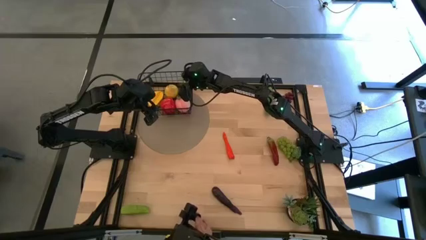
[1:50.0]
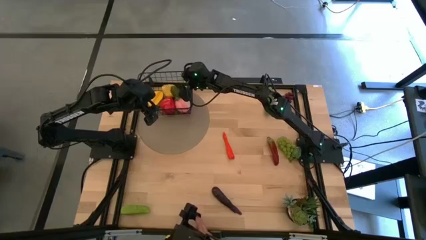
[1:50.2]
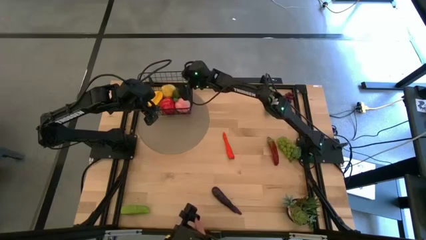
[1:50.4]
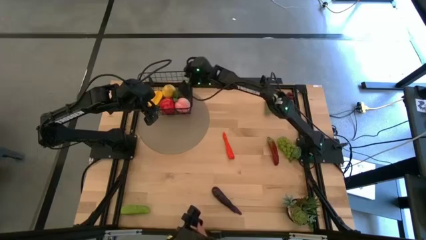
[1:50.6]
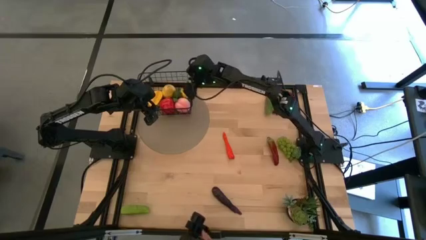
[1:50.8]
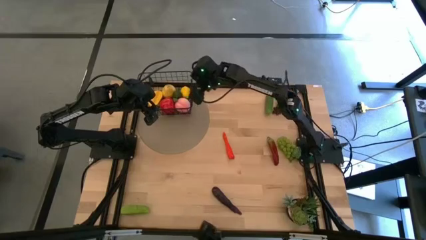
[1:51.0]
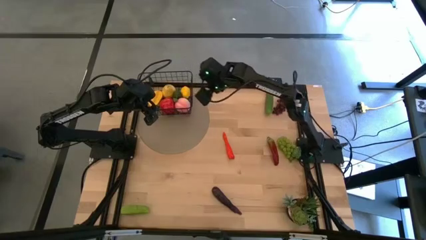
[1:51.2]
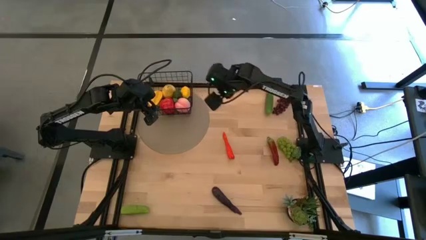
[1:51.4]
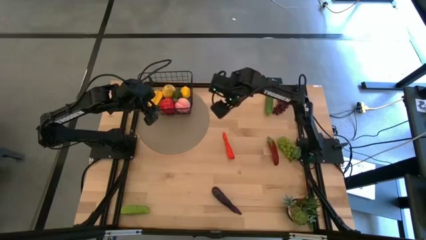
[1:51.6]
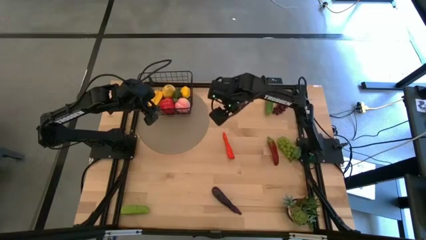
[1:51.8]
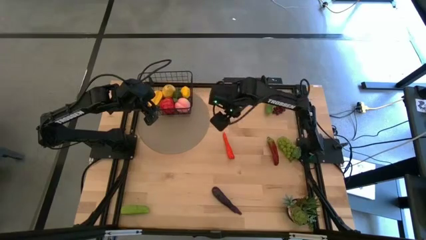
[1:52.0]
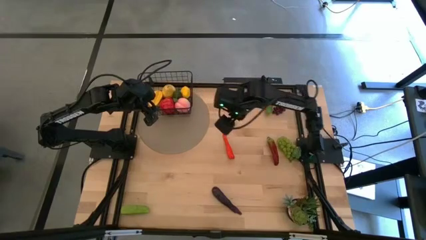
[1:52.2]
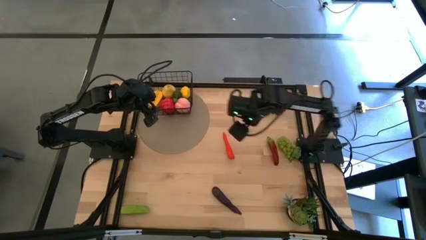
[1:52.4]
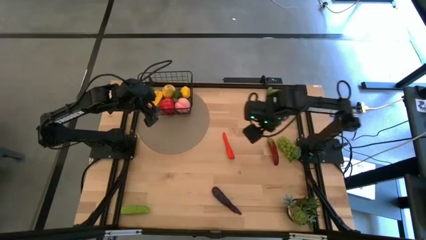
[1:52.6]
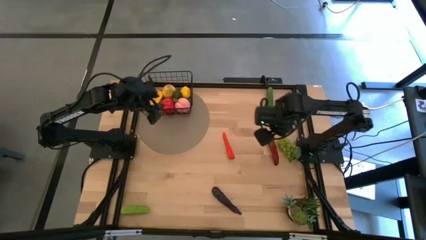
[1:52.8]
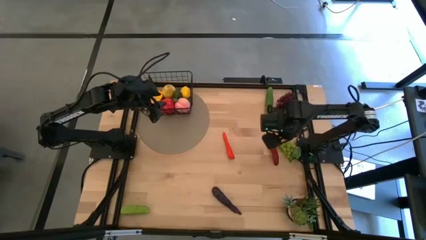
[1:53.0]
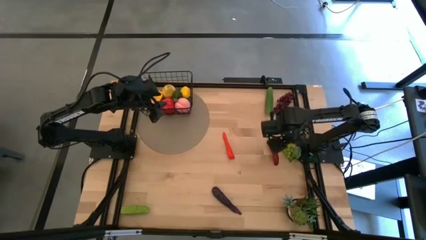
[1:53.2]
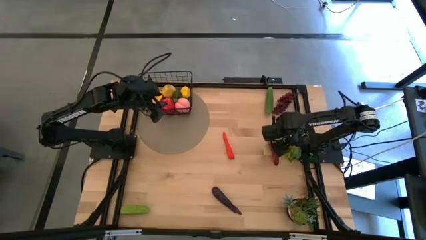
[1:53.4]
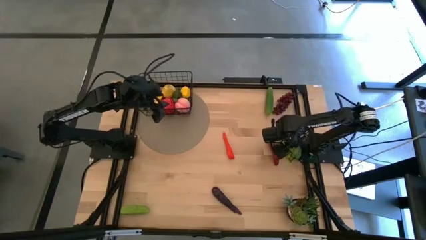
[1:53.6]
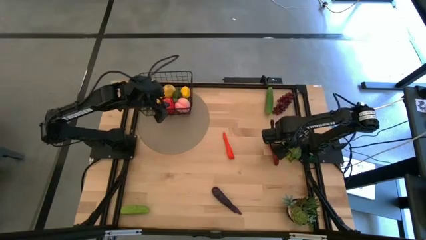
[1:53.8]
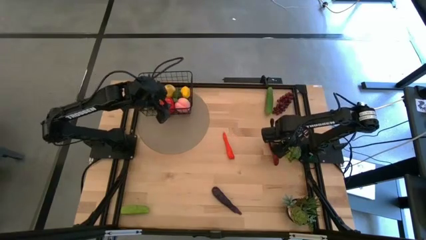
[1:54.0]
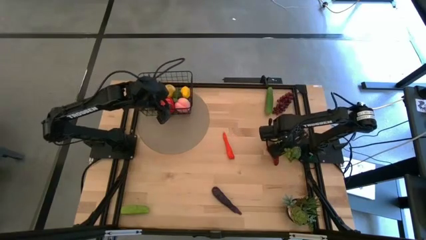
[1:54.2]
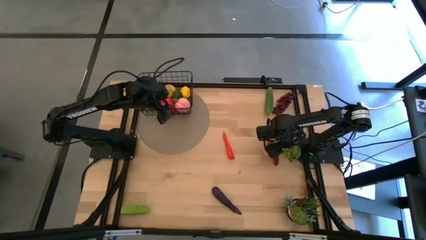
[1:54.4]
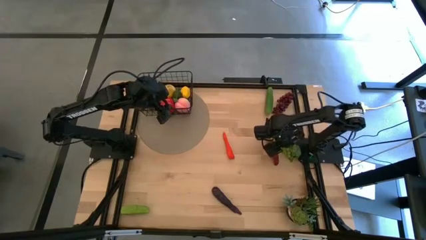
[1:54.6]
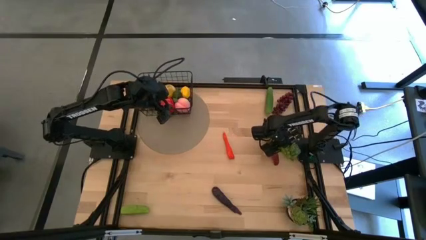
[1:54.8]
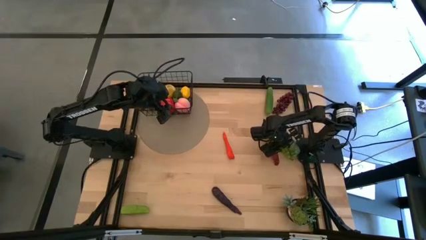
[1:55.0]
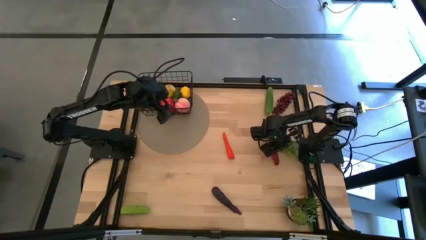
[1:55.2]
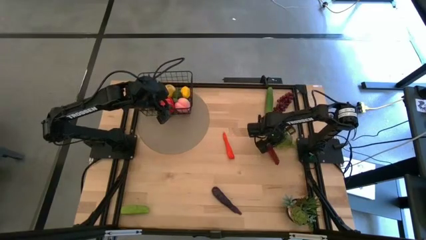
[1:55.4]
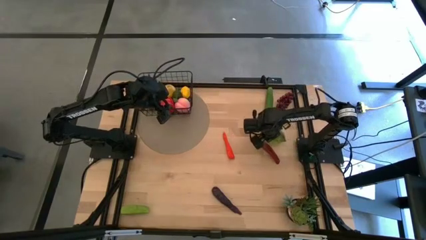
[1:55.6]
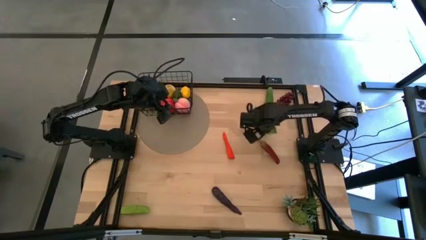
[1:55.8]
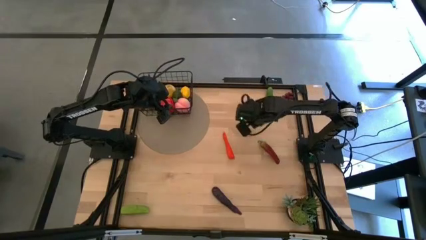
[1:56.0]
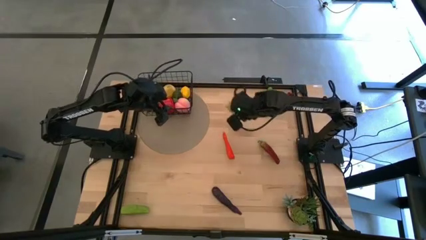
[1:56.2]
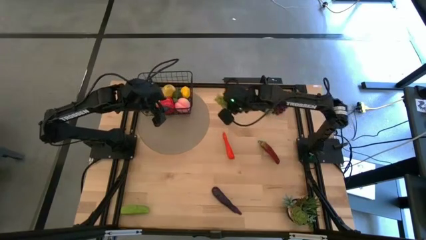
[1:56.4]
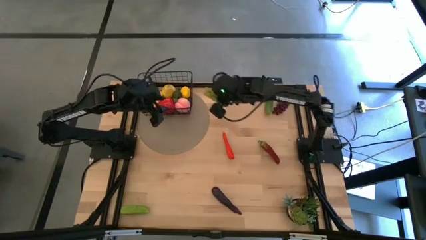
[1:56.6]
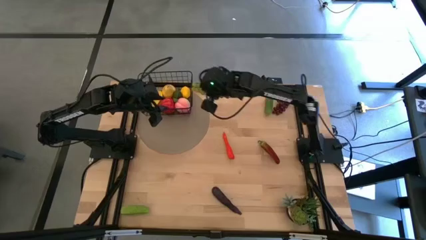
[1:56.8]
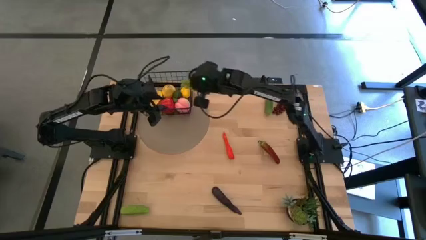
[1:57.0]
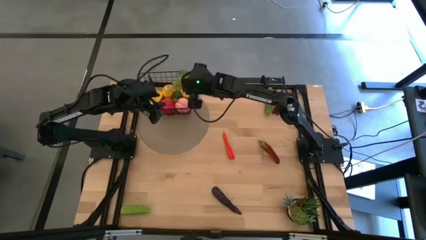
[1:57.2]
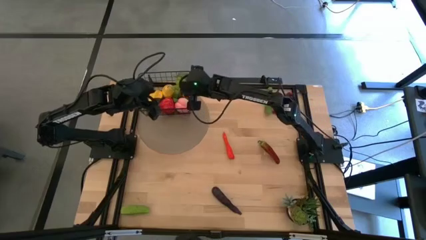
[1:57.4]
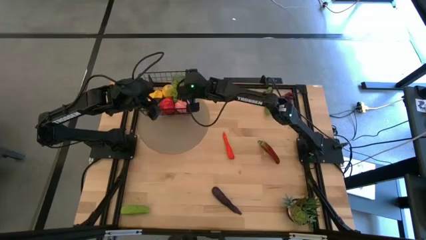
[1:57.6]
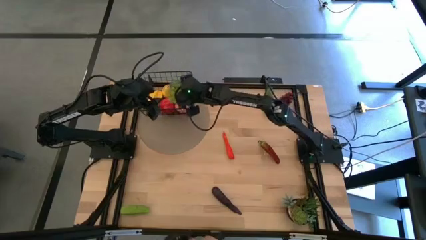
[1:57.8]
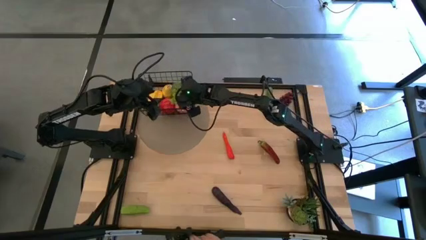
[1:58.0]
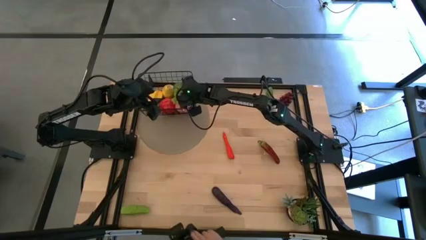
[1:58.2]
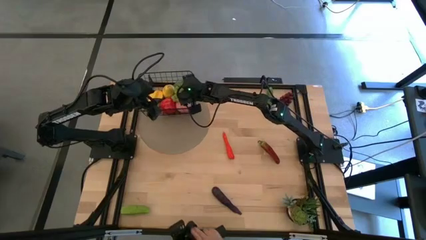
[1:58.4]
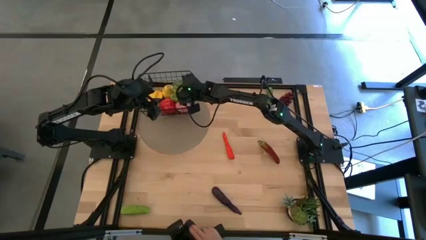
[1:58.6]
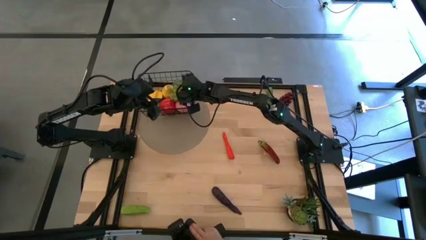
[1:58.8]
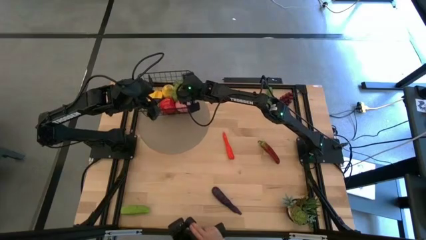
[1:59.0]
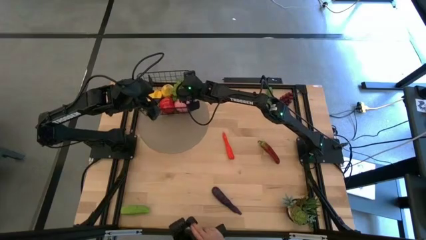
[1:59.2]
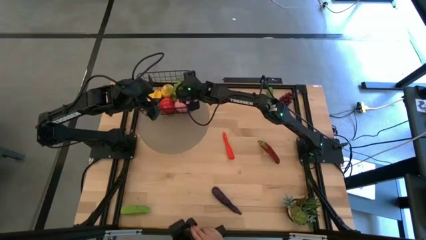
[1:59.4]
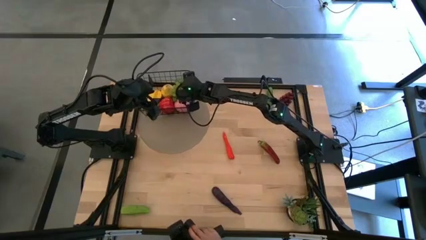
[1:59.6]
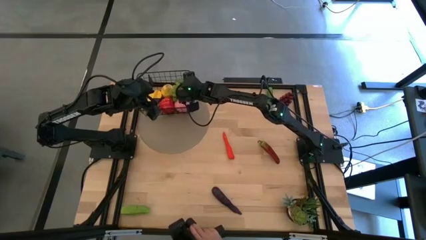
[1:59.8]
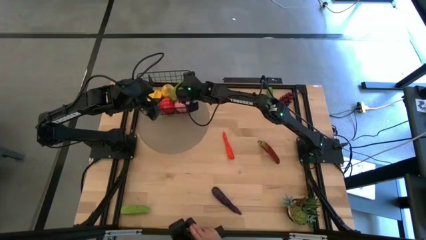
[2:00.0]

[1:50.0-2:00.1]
Task: Build produce basket
Put the green grapes into the black wire basket

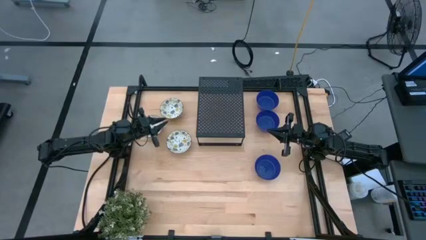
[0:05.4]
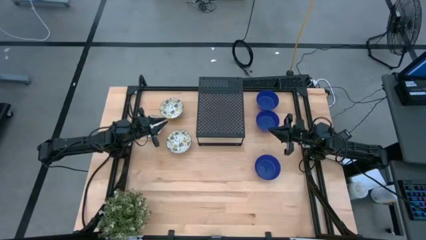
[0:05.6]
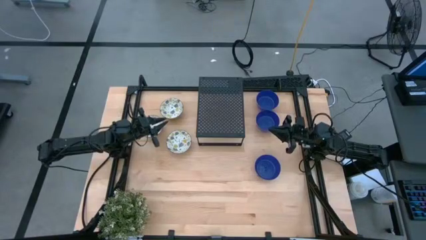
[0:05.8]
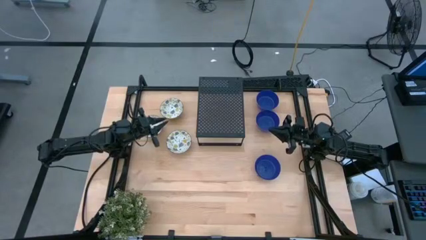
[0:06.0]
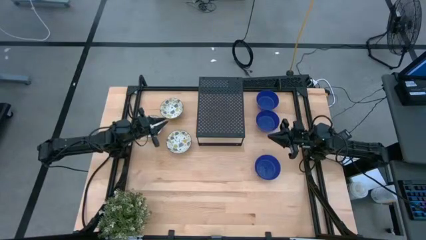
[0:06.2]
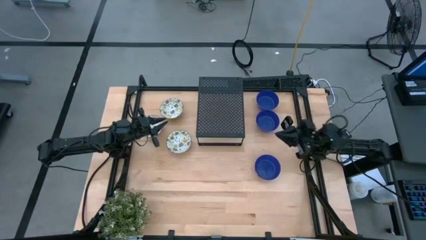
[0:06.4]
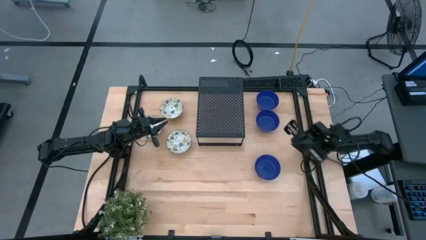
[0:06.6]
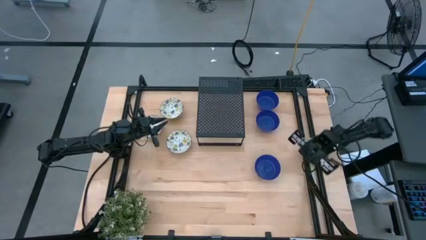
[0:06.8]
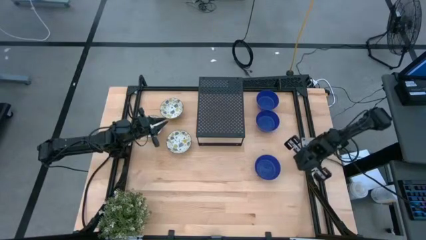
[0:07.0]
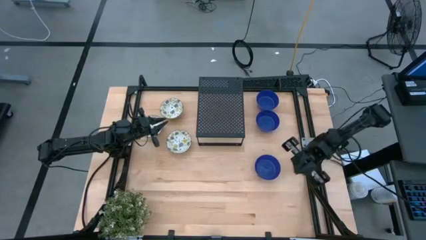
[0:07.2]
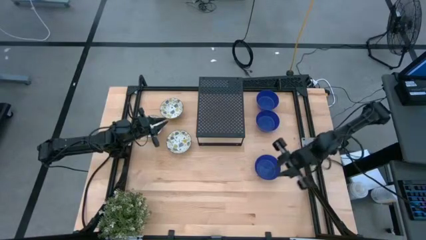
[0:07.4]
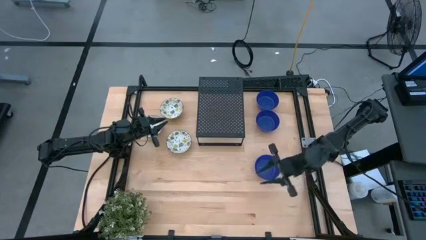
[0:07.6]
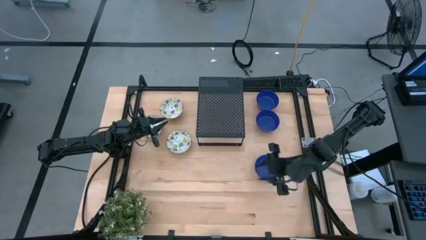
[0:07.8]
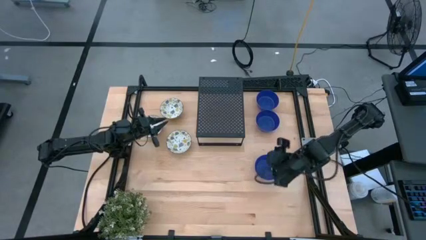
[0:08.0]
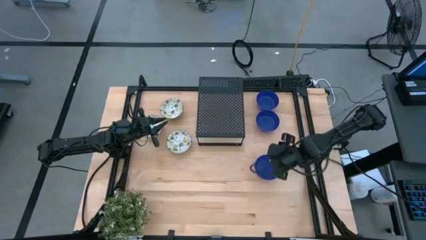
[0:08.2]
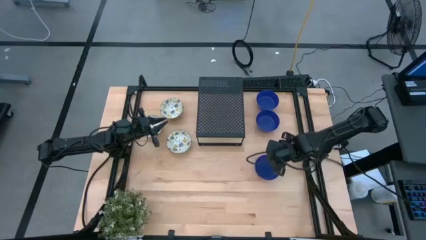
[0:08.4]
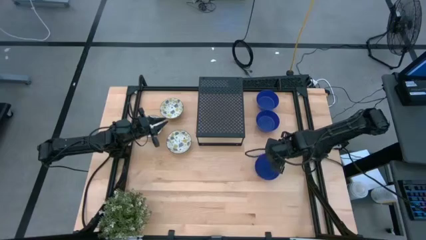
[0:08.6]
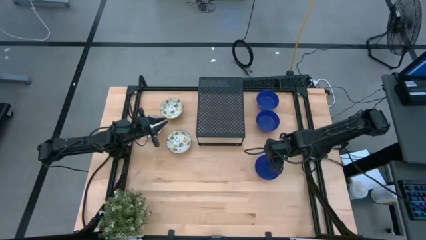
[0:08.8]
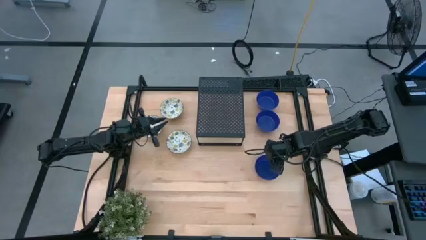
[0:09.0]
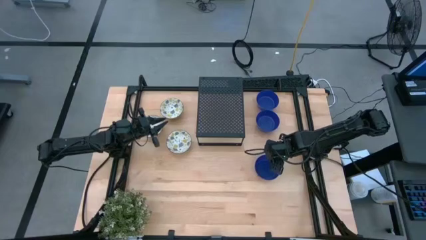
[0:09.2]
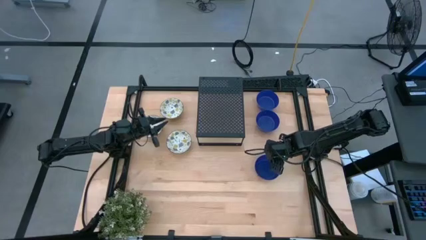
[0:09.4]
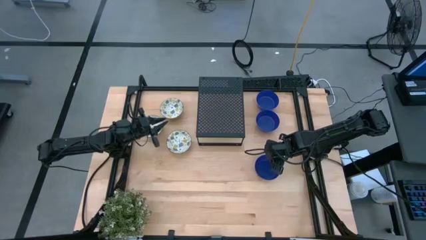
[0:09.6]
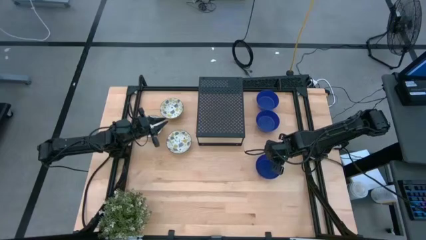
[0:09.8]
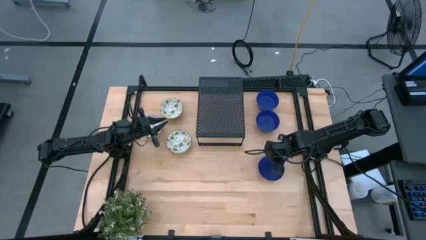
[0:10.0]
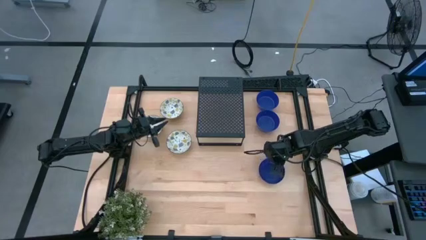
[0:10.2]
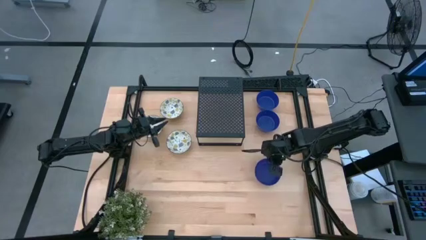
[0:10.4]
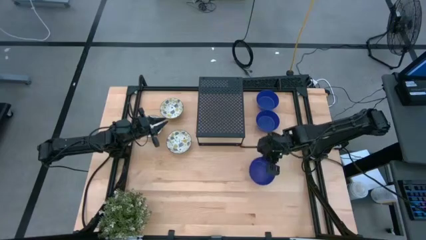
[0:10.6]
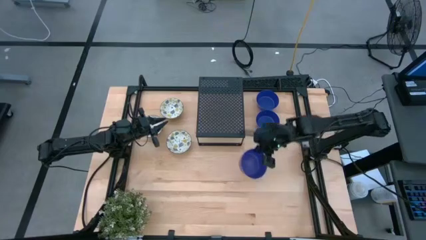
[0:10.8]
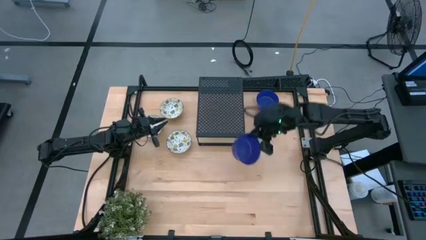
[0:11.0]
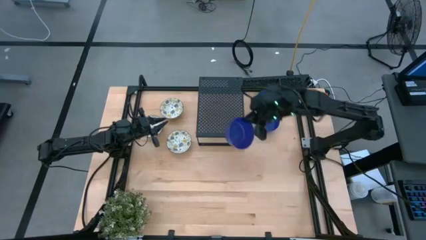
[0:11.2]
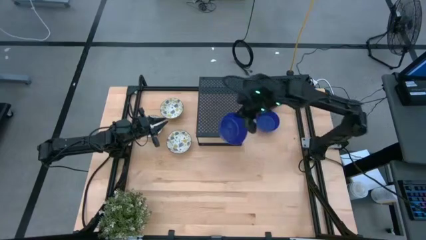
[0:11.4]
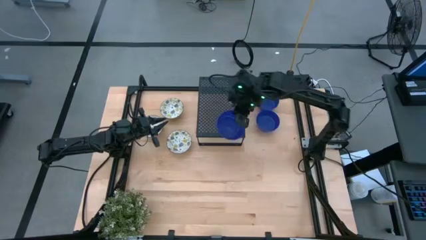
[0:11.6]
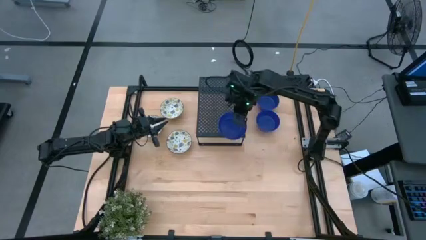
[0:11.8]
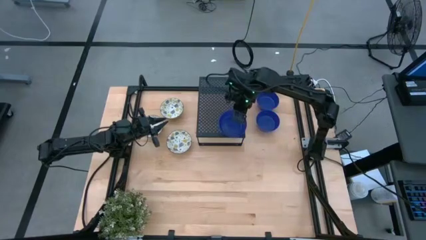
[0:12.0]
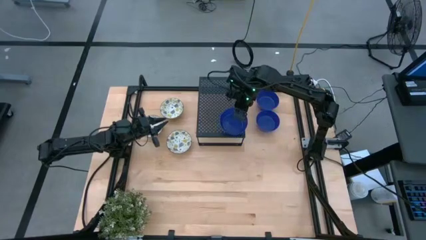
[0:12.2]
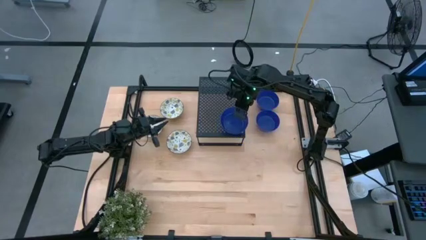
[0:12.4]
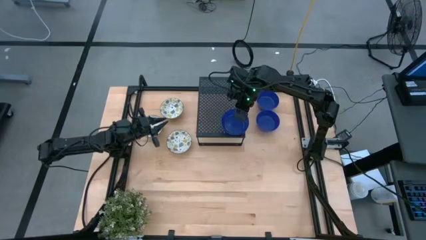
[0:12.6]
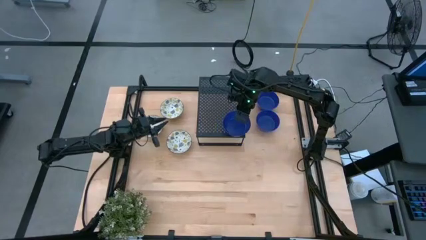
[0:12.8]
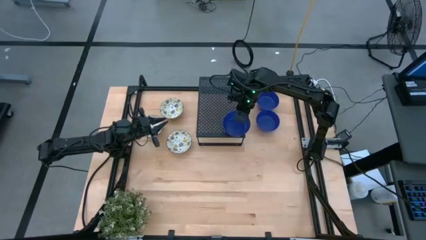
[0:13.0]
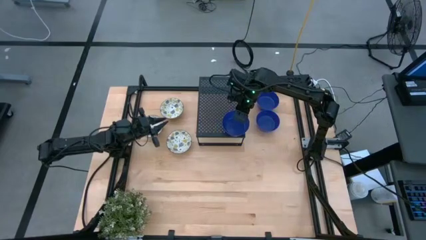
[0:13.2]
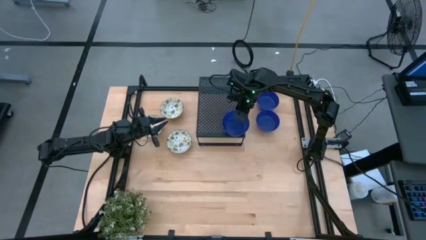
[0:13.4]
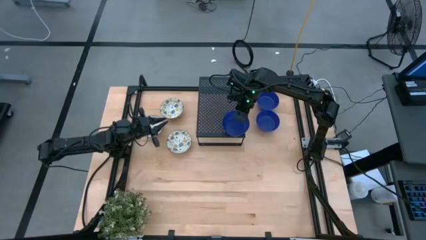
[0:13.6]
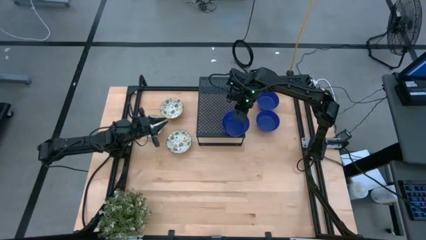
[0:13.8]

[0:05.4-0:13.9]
Task: Pick & Place Mini bowls
Put the bottom blue bowl on the shelf
